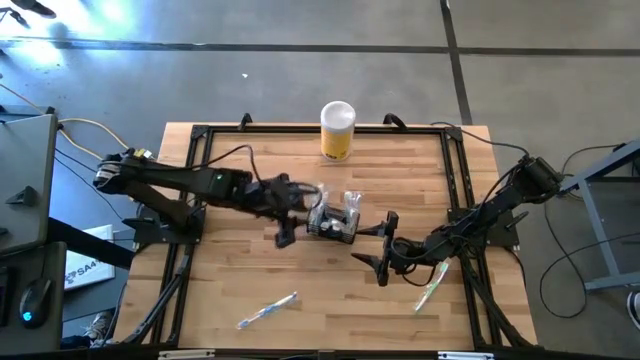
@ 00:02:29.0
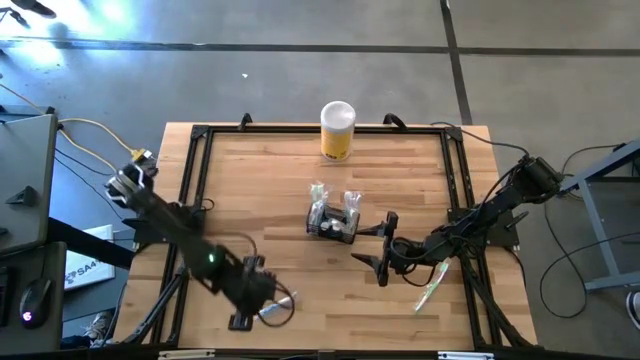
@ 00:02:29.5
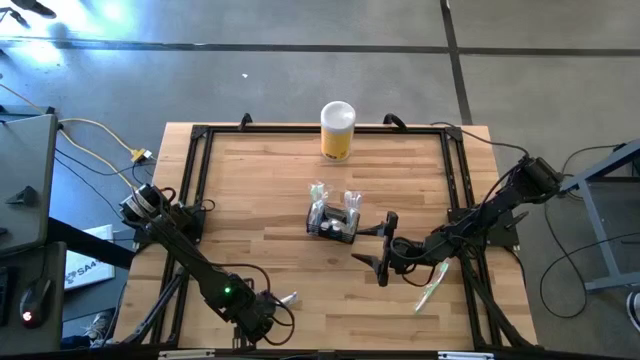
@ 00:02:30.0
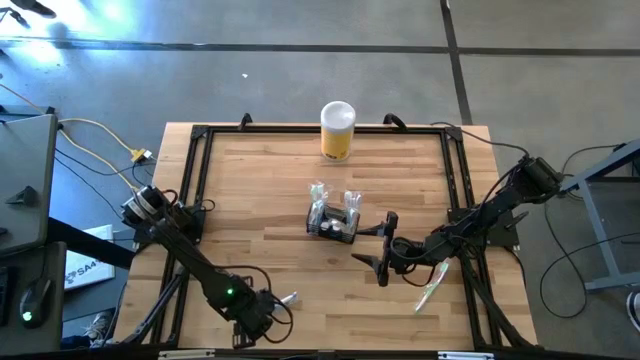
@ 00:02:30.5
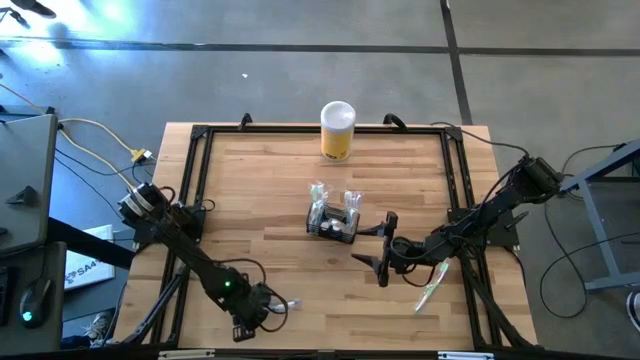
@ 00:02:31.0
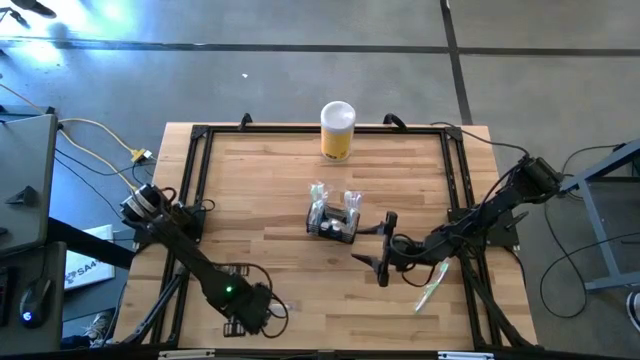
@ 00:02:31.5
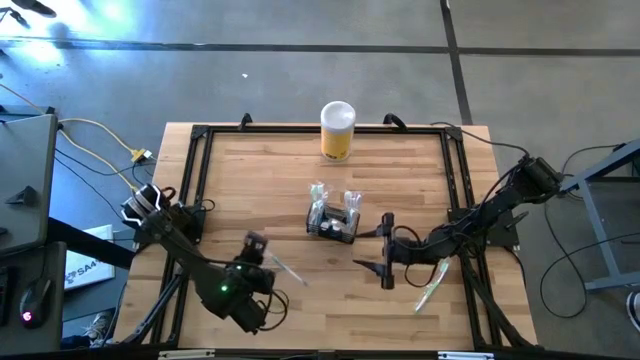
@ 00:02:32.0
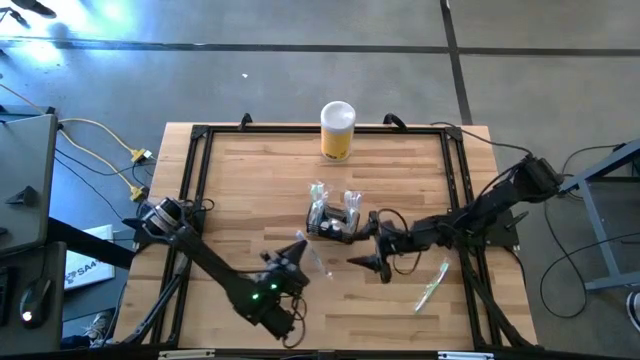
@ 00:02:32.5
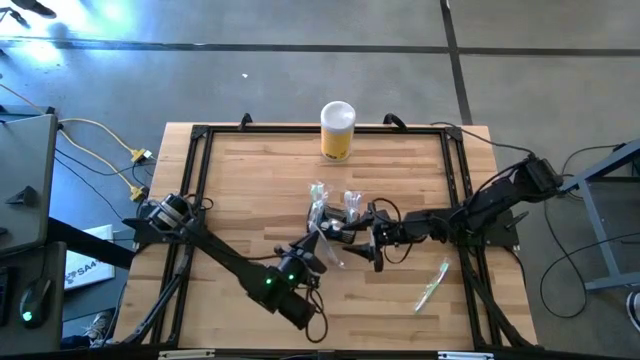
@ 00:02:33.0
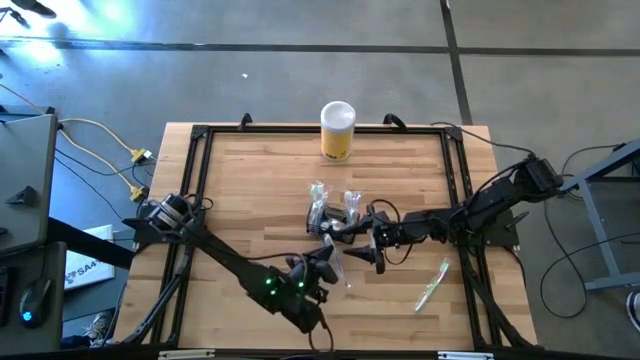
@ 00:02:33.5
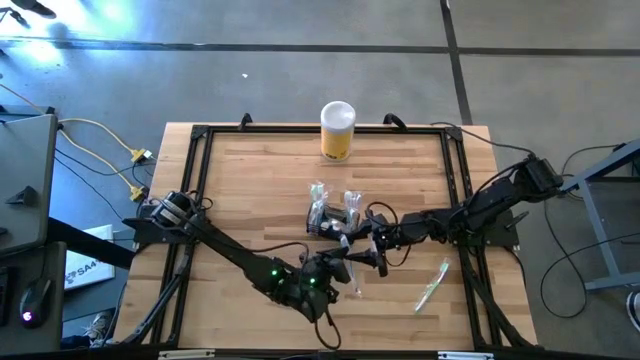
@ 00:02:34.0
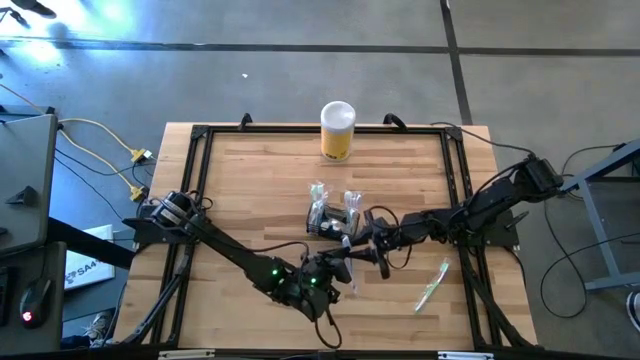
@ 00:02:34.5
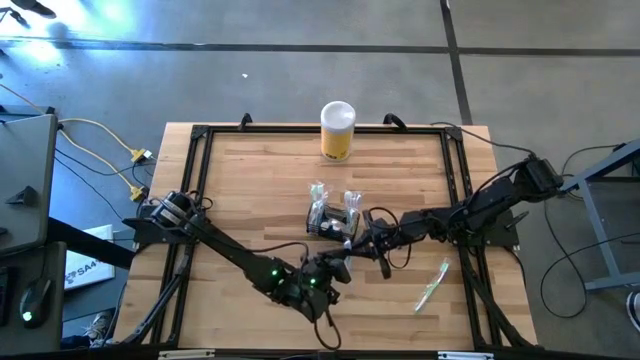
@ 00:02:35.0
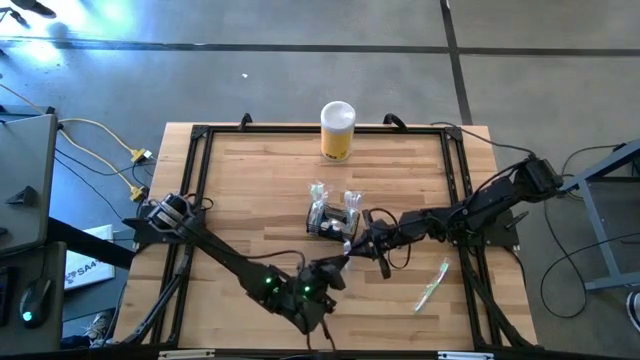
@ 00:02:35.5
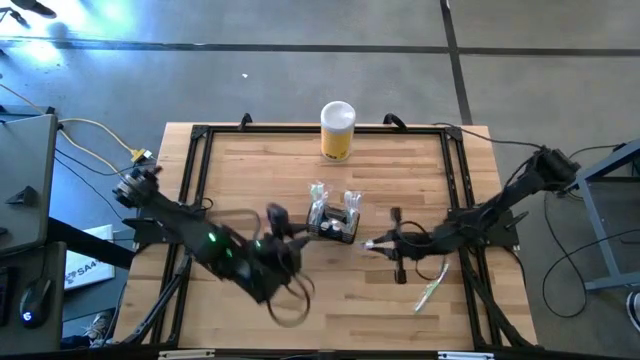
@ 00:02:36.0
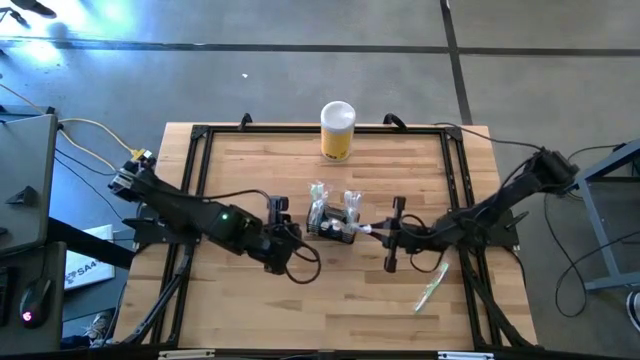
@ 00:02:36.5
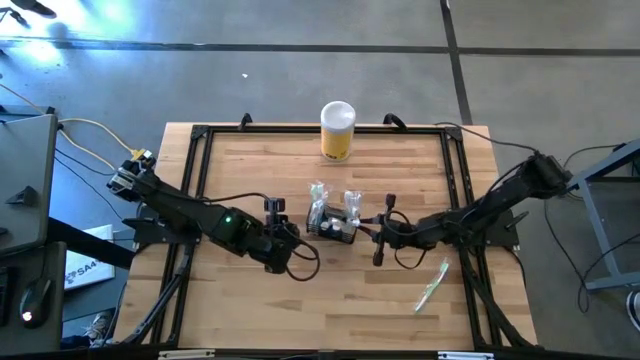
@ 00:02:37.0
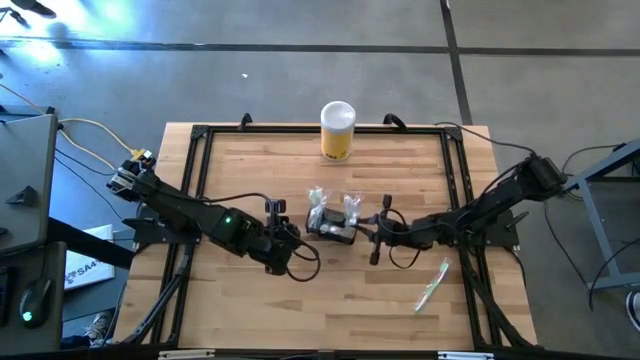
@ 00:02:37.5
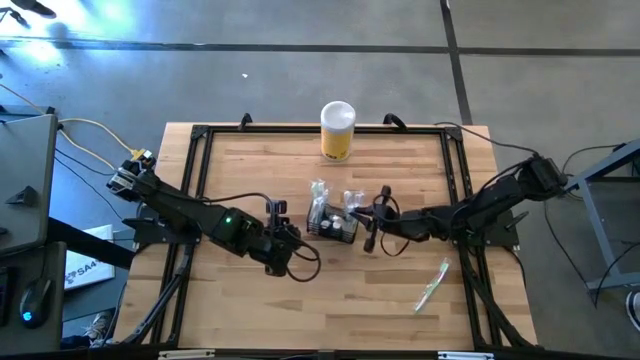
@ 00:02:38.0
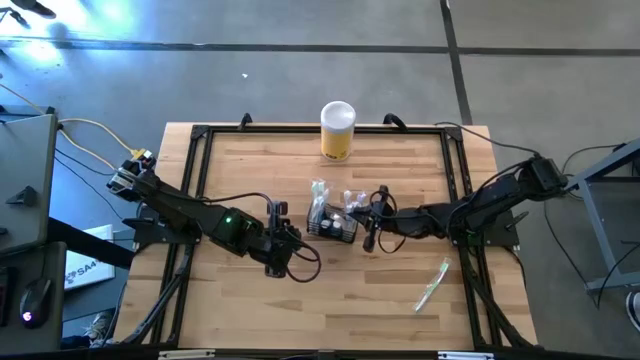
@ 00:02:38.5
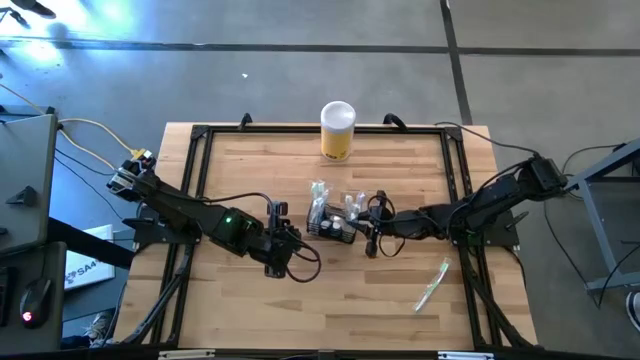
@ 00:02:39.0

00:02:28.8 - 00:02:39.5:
Task: Pick & Place toothbrushing station
Put the blue toothbrush into the wire organizer

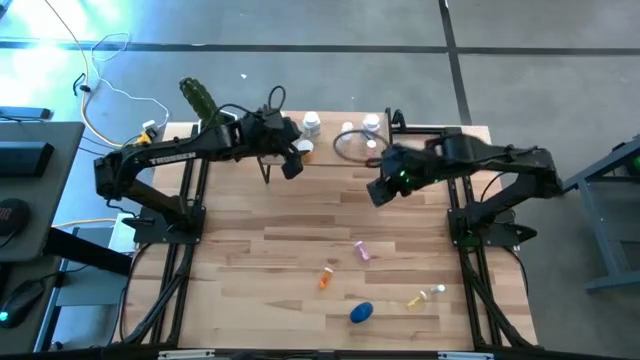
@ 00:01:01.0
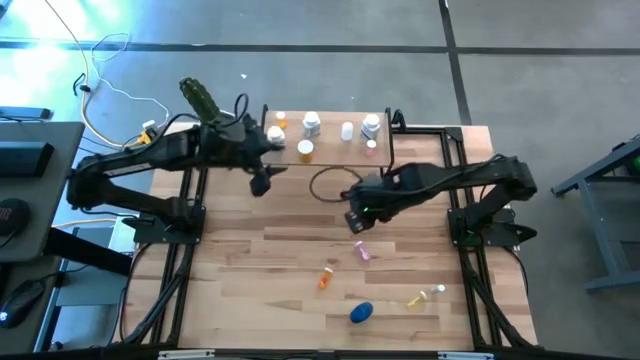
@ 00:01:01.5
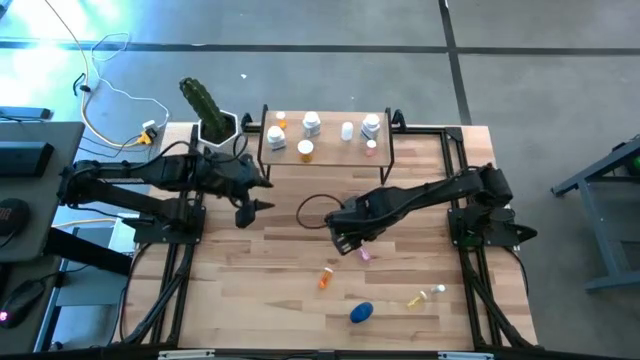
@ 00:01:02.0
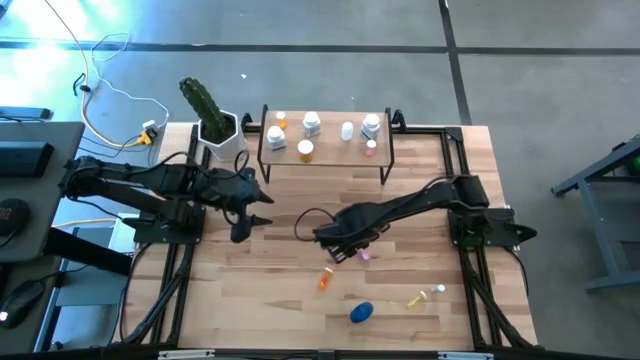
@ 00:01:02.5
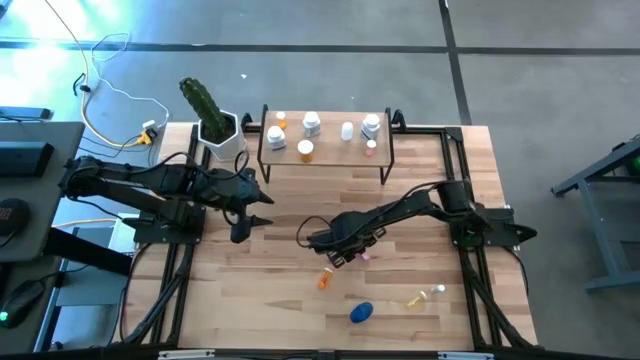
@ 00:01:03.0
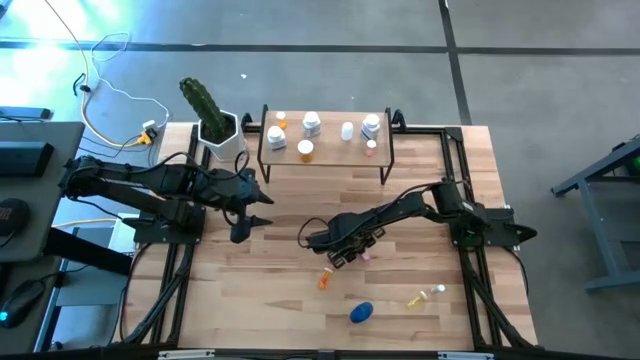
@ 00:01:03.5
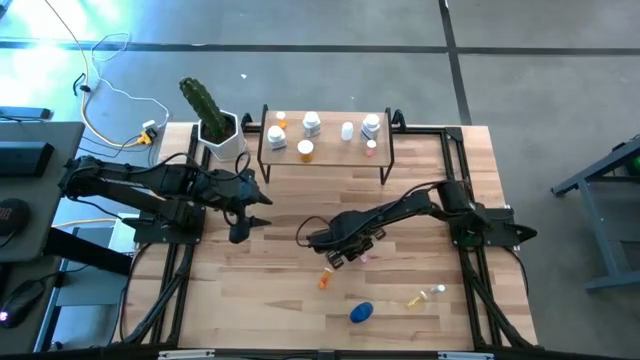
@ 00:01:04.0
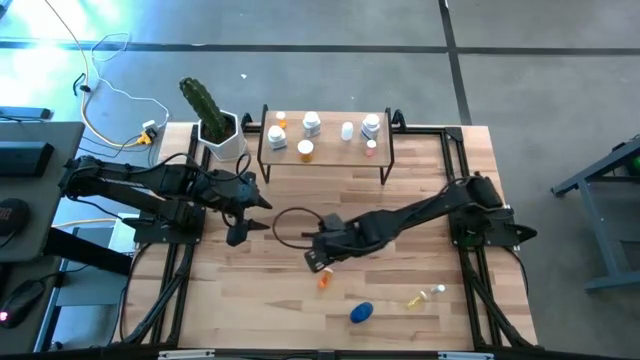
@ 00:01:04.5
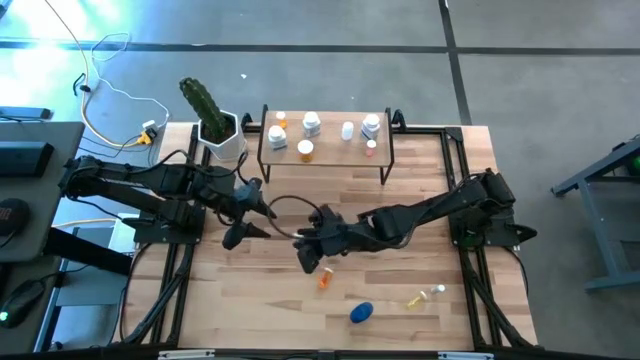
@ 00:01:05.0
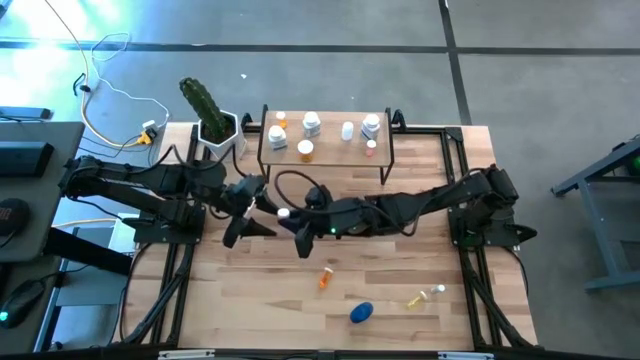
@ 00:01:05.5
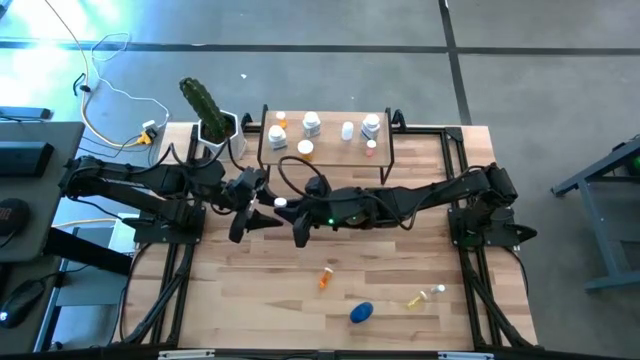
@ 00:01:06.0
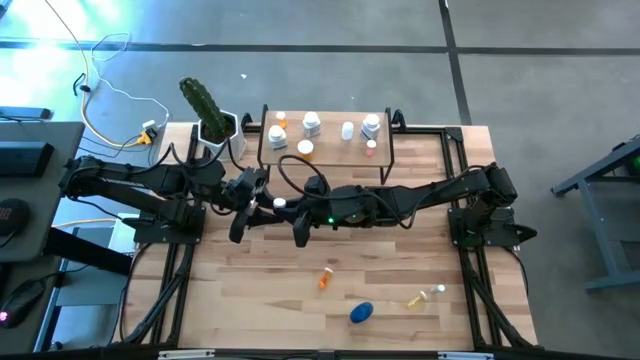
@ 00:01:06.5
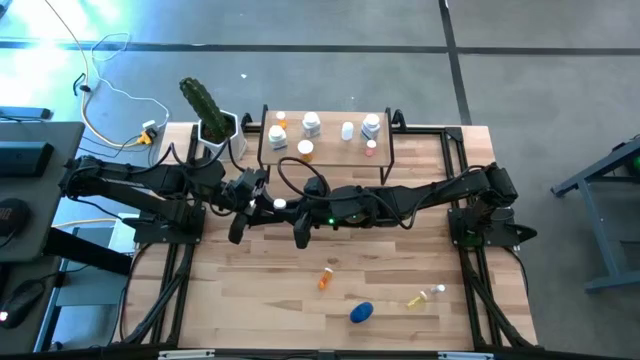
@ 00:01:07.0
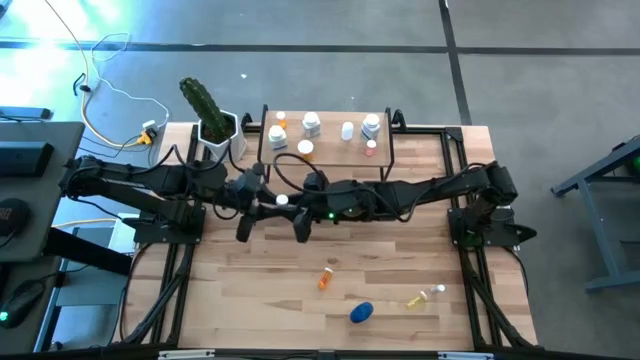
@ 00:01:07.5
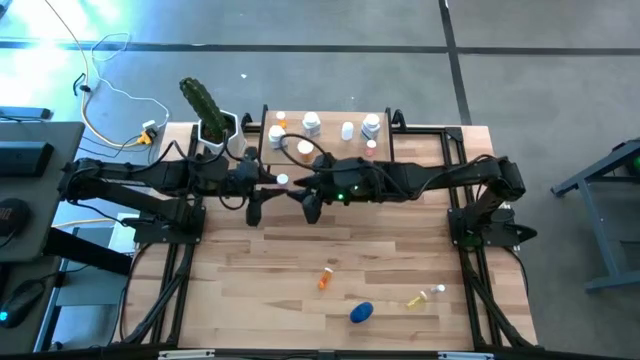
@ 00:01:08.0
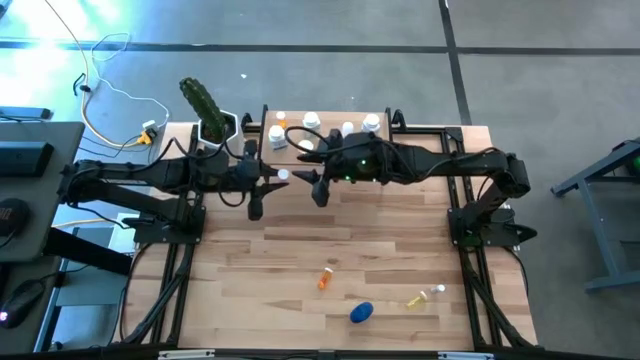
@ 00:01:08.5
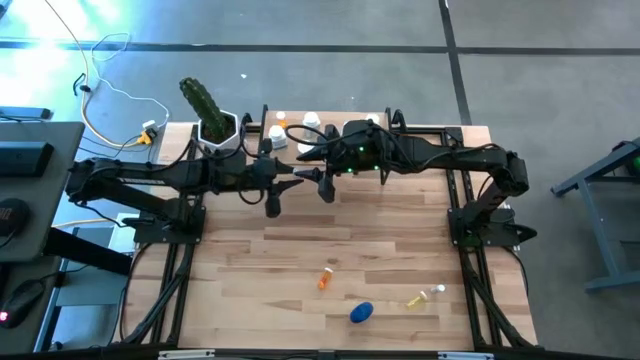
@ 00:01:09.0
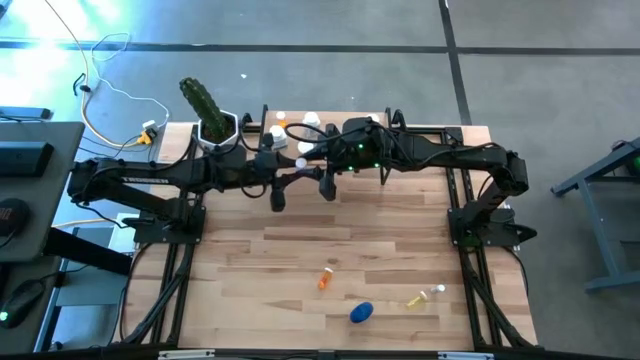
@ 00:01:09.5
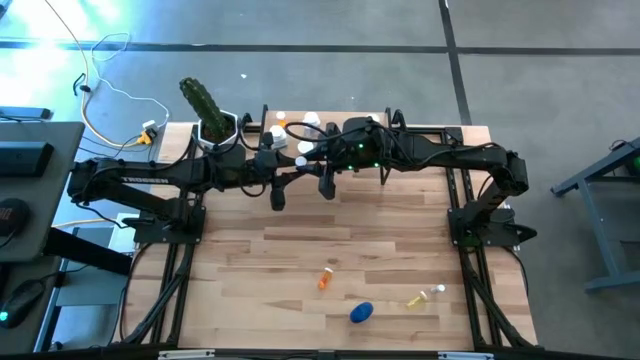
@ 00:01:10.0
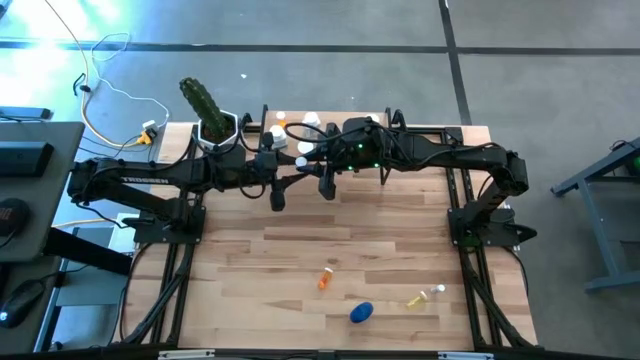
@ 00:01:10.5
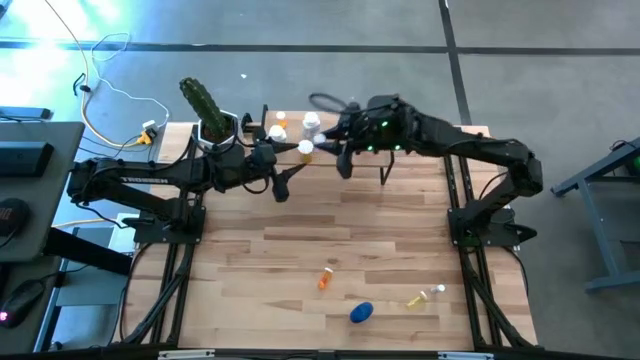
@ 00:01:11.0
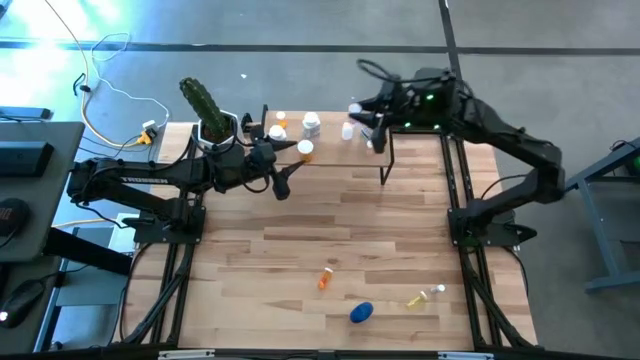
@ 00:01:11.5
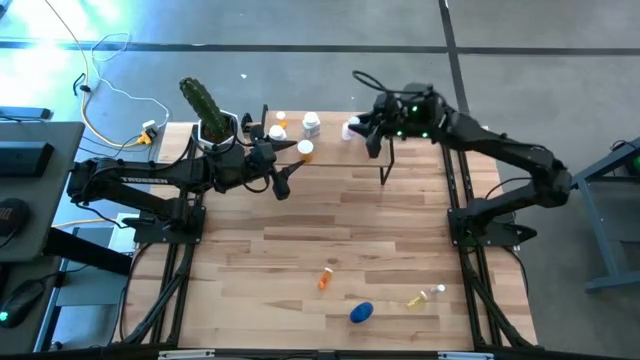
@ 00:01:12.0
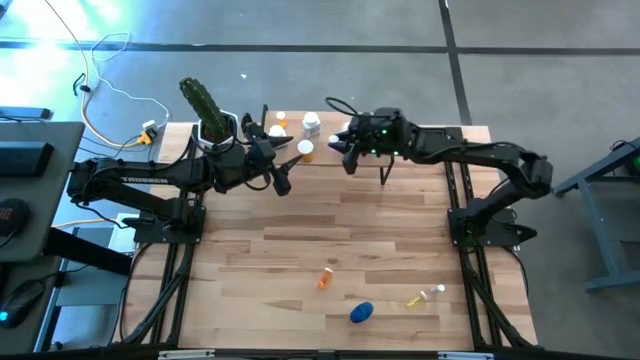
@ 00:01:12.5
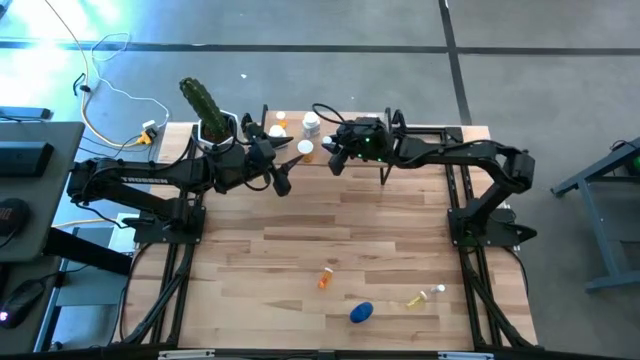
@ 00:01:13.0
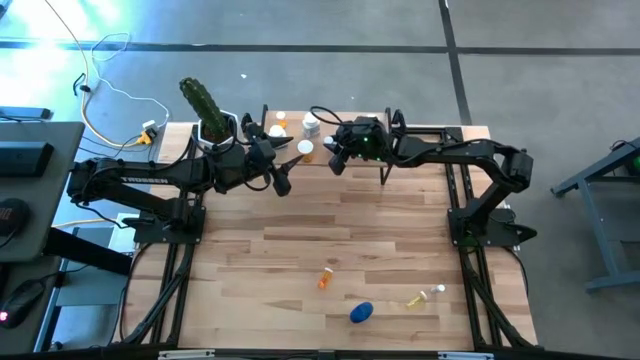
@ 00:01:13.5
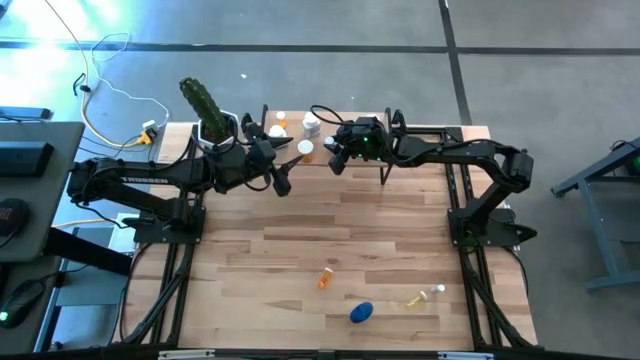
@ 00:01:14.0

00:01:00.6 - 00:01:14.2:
Task: Pick and place medicine bottles onto shelf by color
Put the pink pill bottle on the shelf
